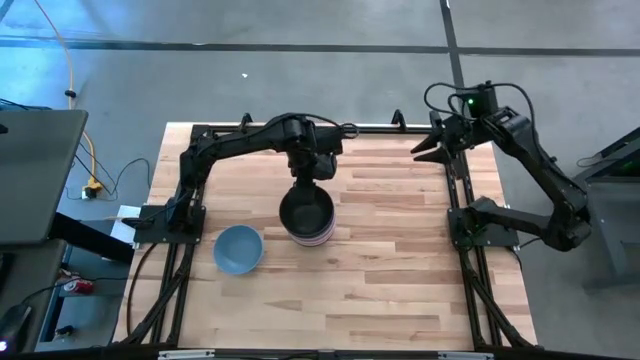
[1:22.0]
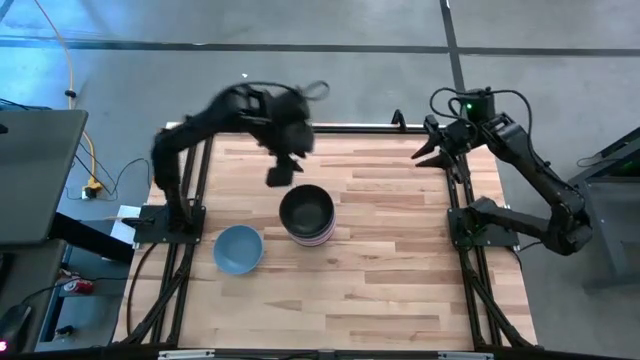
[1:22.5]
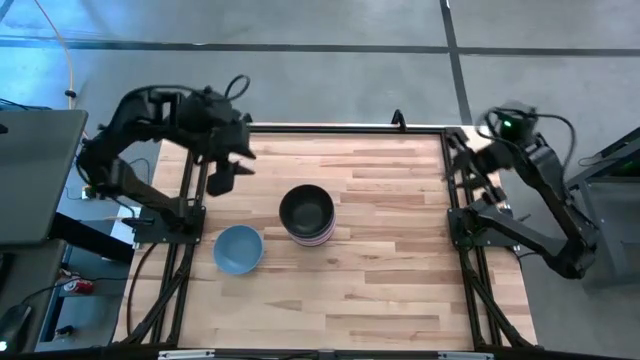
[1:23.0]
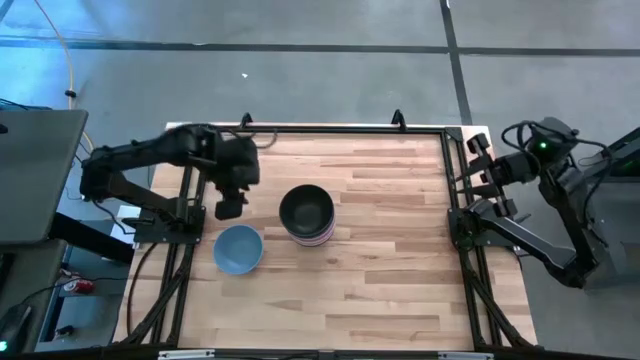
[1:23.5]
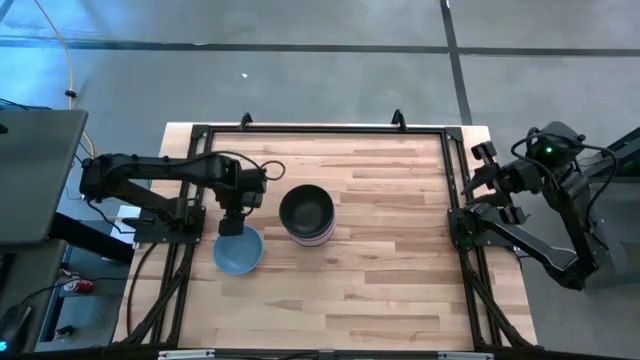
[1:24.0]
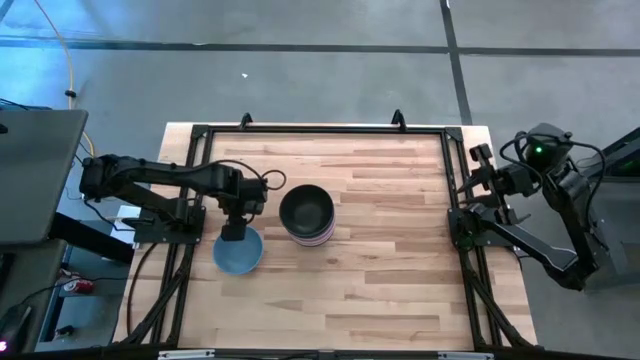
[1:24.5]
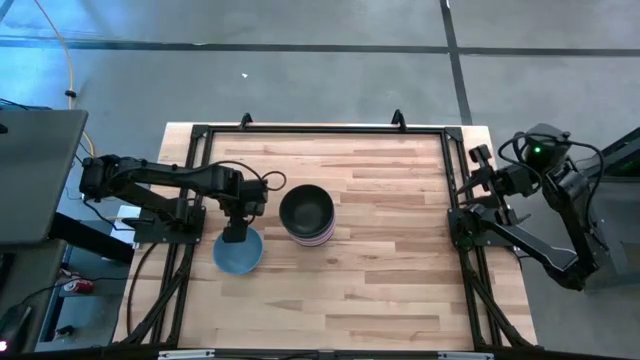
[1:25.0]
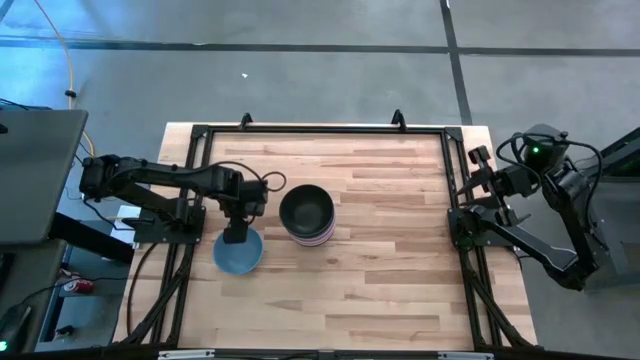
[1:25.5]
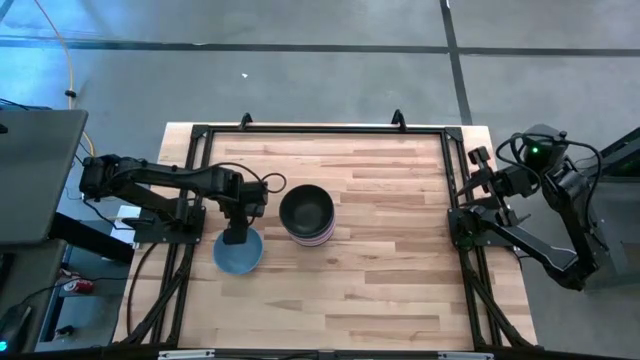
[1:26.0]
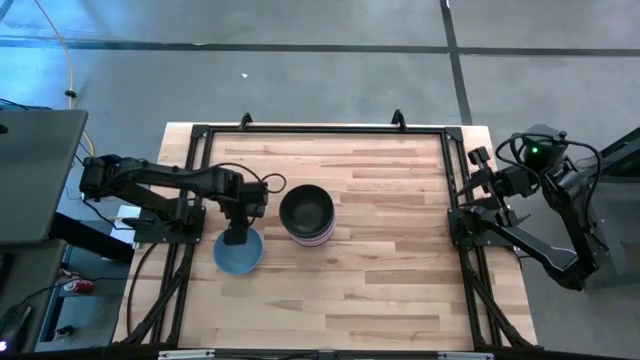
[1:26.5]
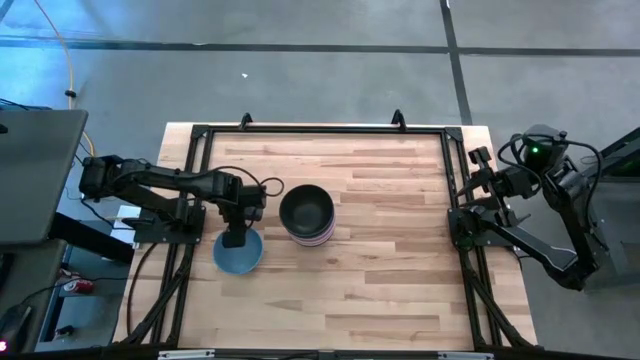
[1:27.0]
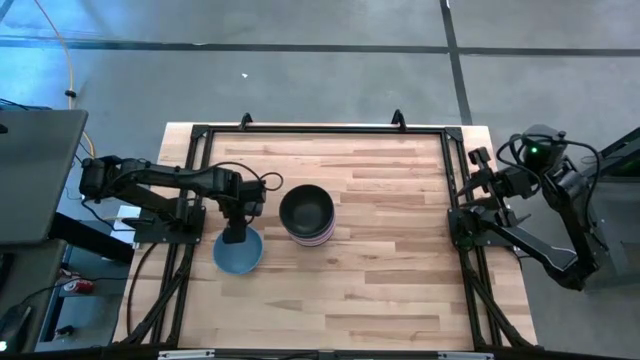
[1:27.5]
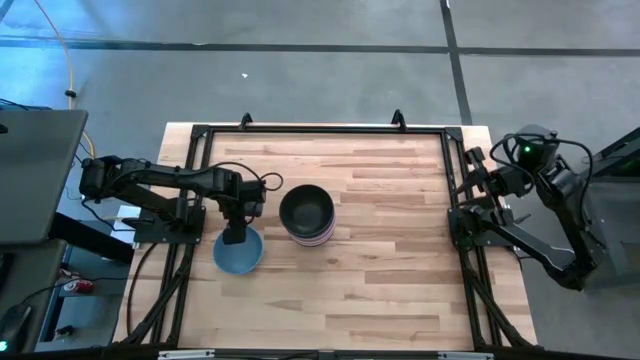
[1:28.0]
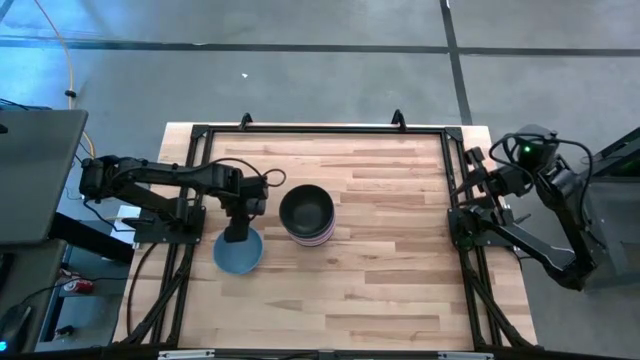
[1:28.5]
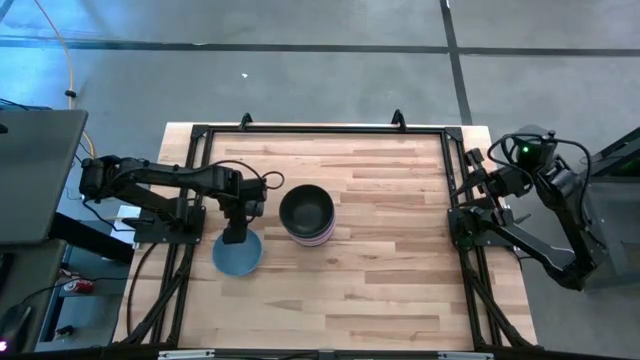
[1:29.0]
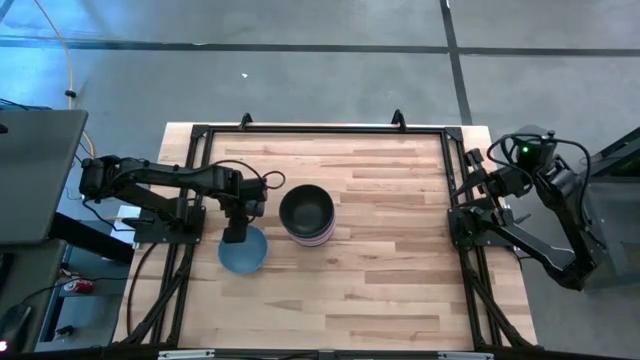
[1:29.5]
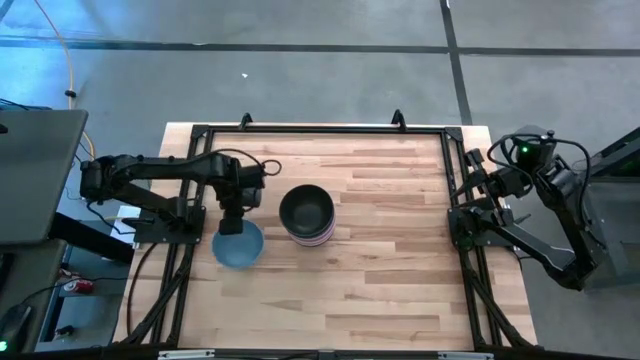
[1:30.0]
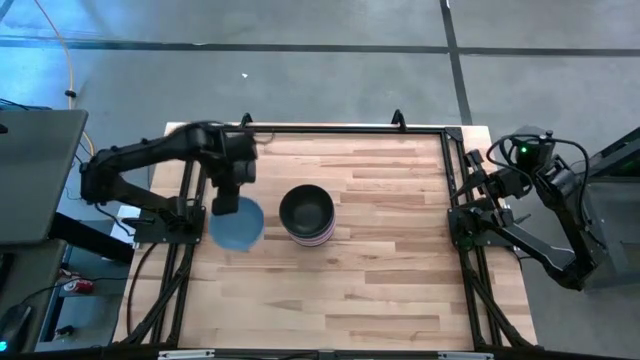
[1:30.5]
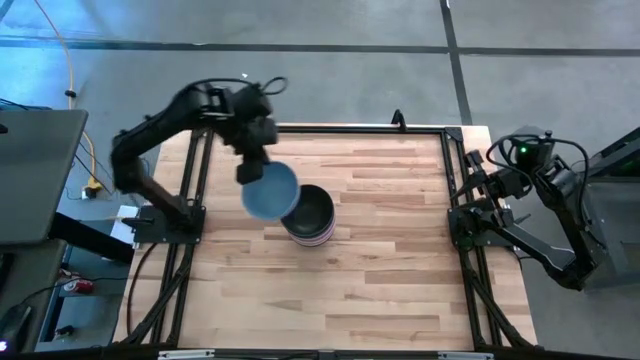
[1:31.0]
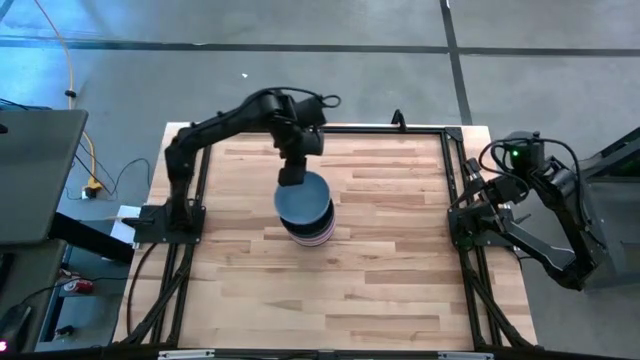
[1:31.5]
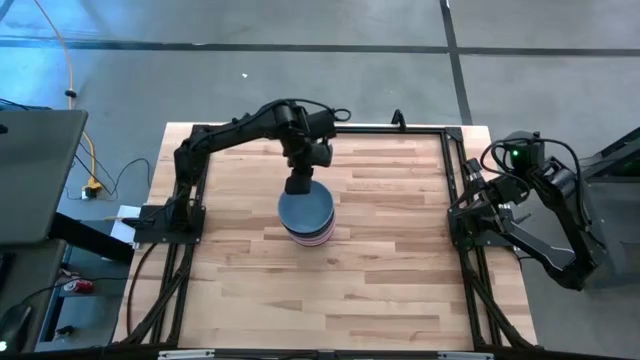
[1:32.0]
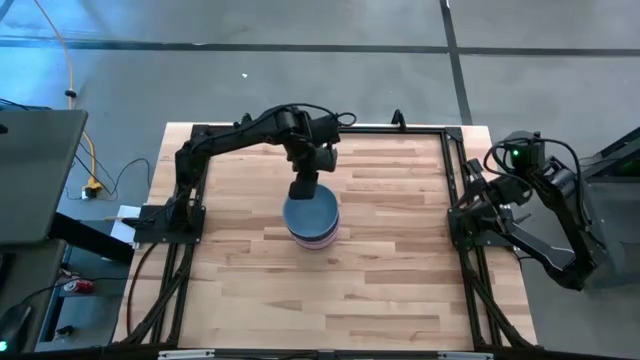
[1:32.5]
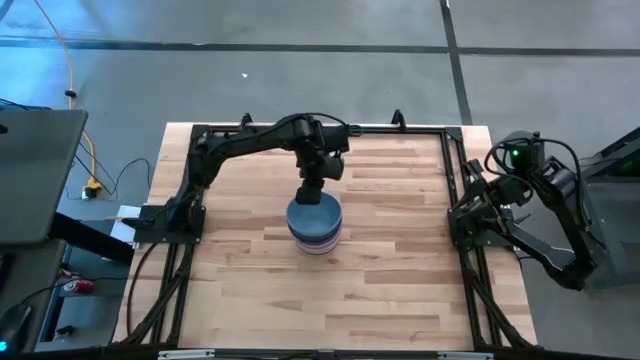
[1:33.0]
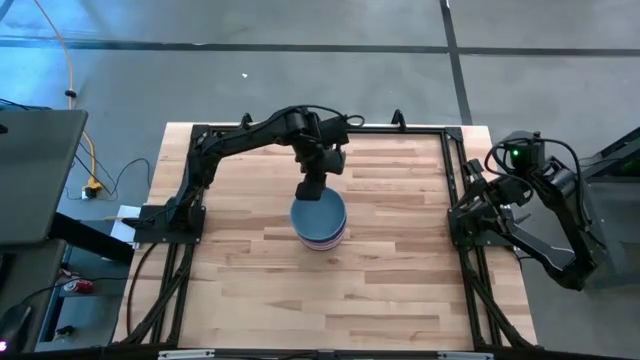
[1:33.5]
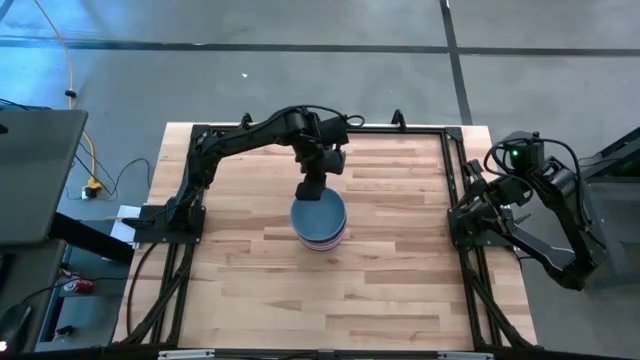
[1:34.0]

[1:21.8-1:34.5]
Task: Nest bowls inside each other
Stack the blue bowl on top of the black bowl

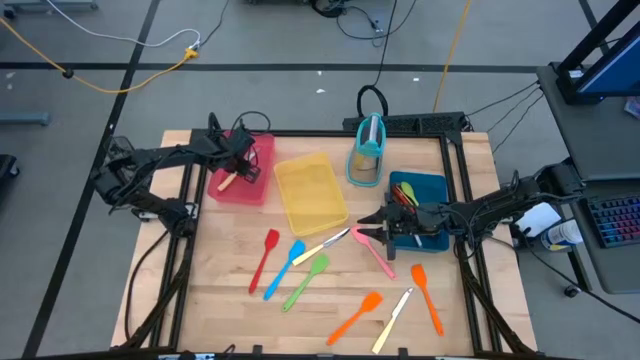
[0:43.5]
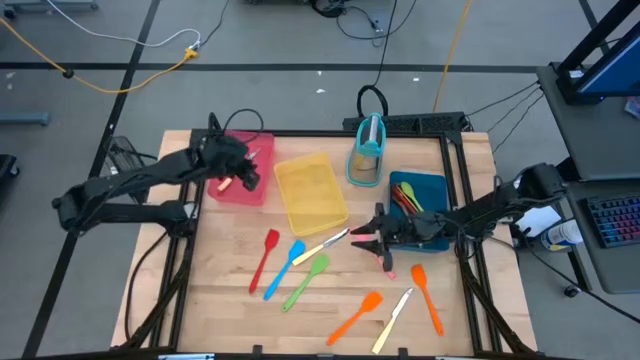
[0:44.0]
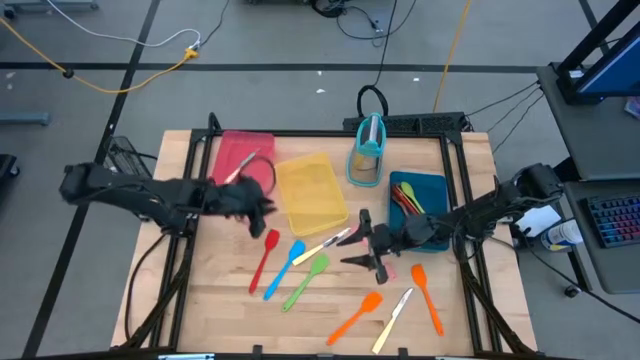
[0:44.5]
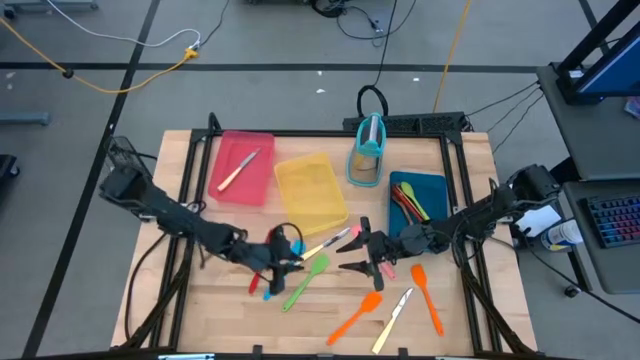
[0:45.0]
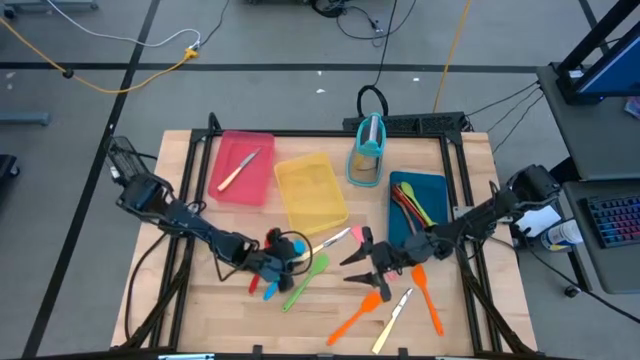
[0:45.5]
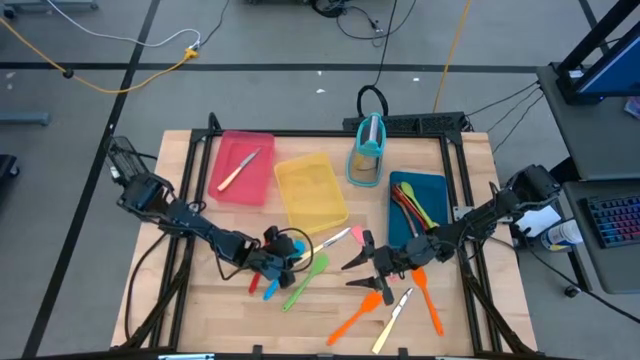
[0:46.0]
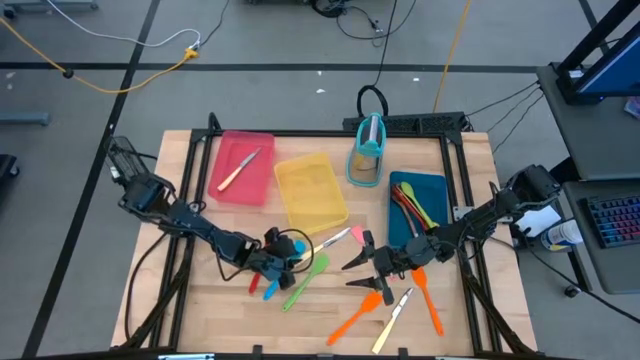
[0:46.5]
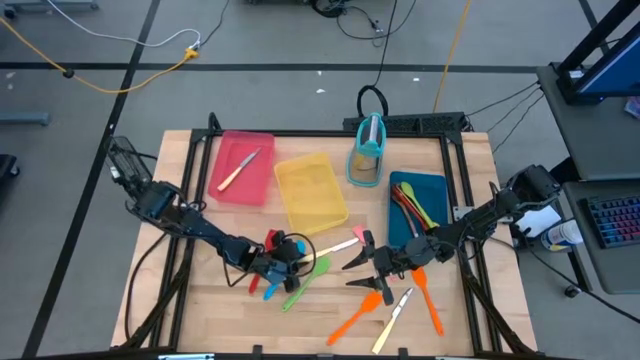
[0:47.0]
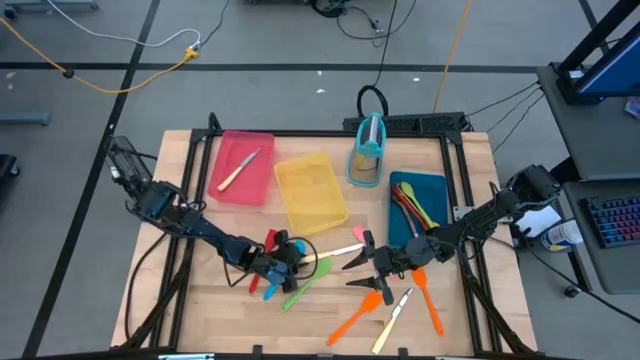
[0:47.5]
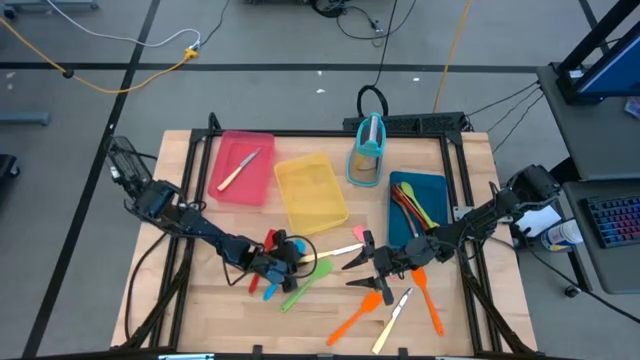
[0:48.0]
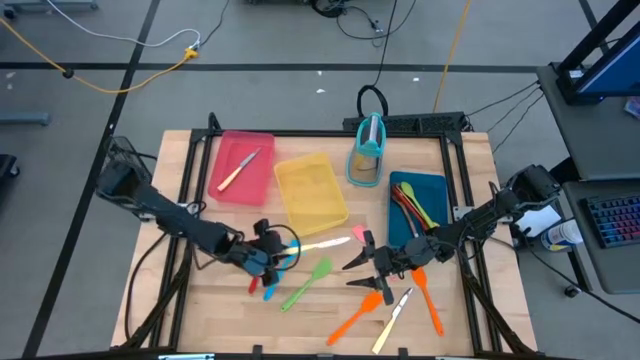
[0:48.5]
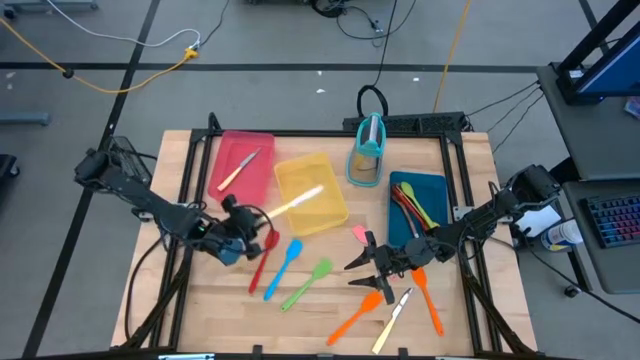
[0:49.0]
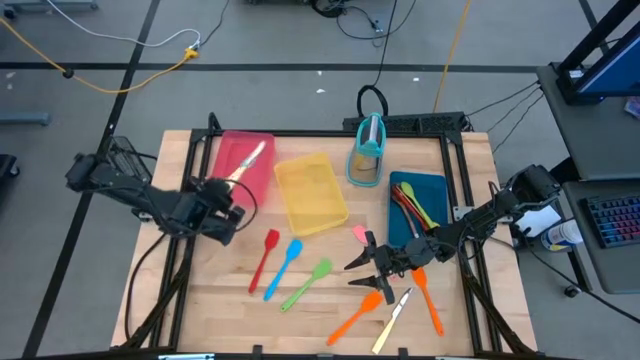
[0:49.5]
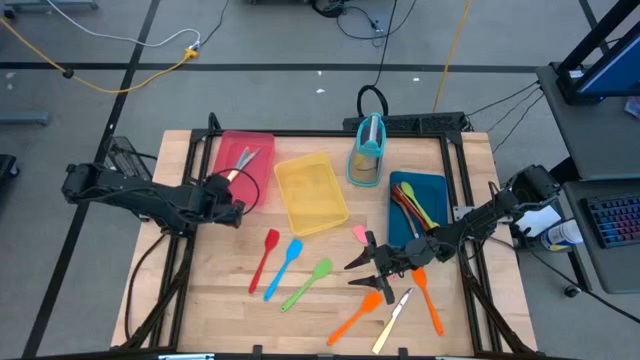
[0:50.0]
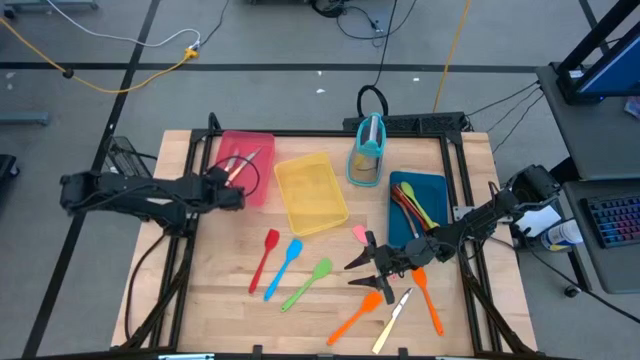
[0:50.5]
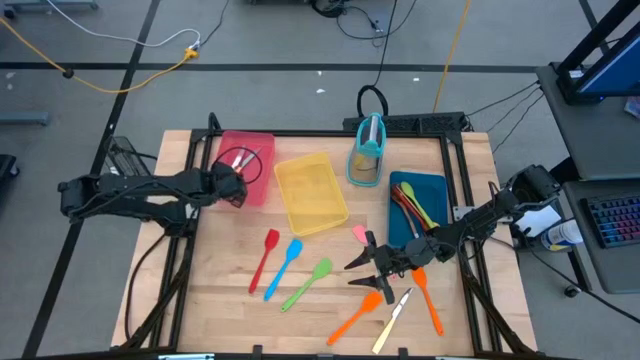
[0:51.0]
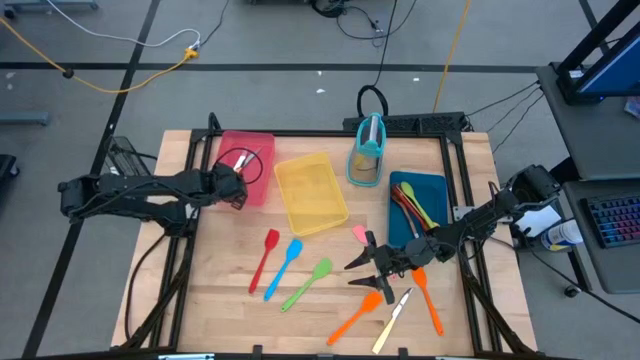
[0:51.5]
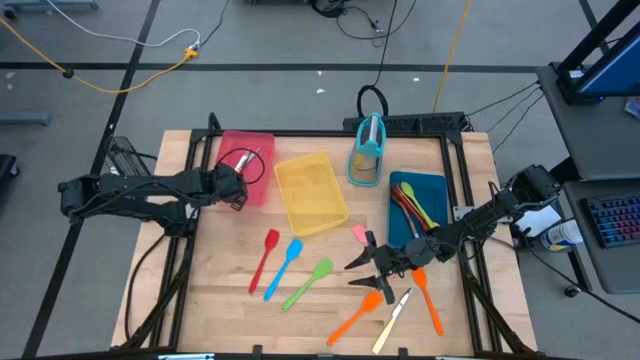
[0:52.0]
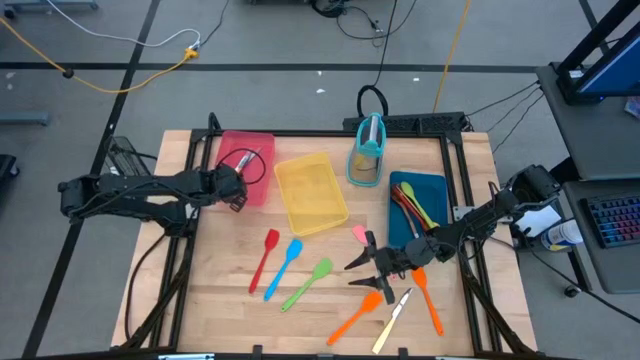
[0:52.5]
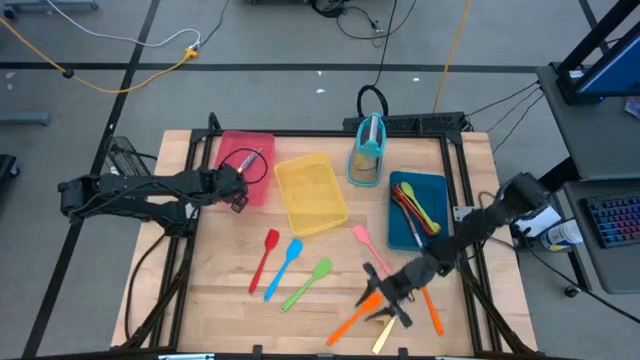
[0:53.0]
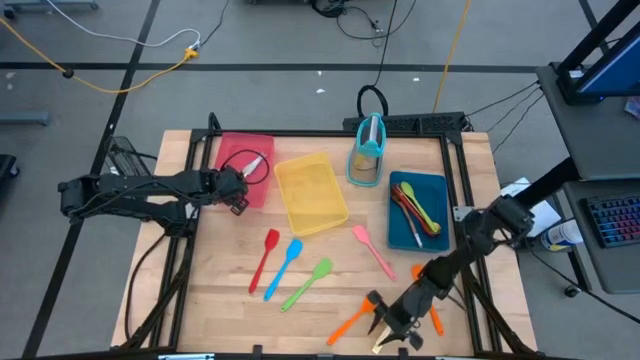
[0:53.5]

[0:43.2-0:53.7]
Task: Pick & Place Kitchen Items
Put the top yellow knife into the red bin
